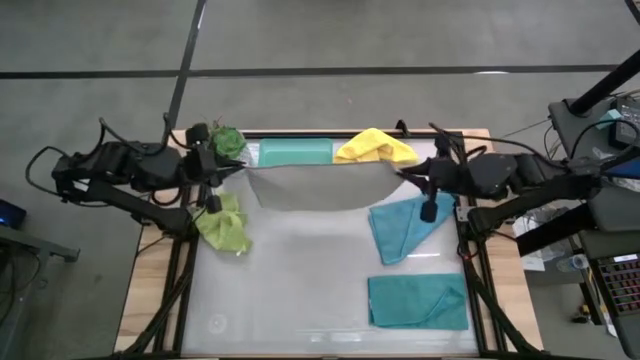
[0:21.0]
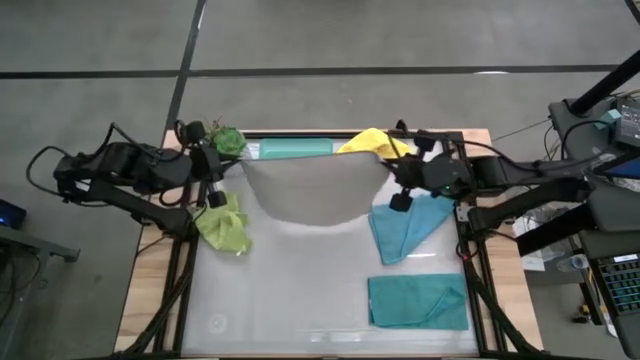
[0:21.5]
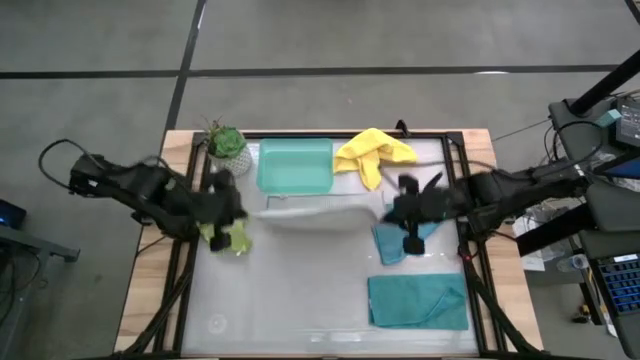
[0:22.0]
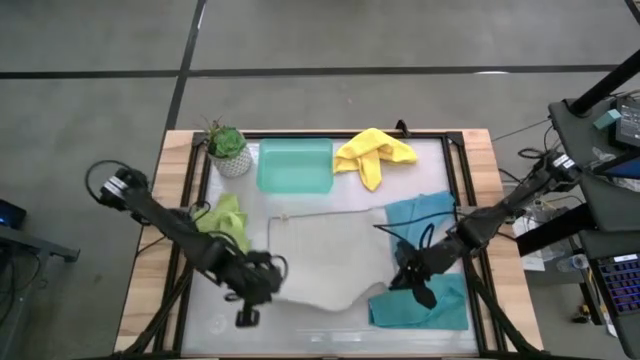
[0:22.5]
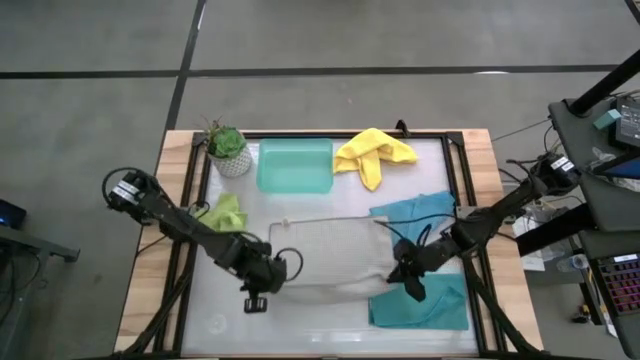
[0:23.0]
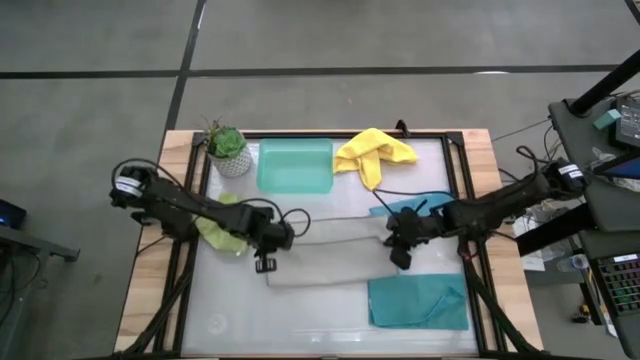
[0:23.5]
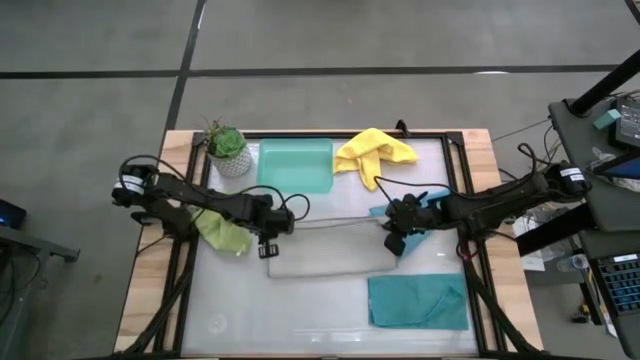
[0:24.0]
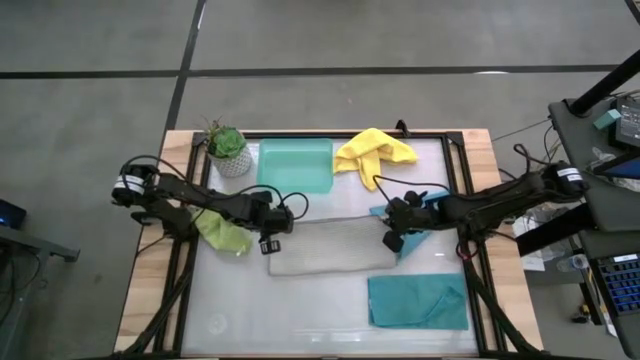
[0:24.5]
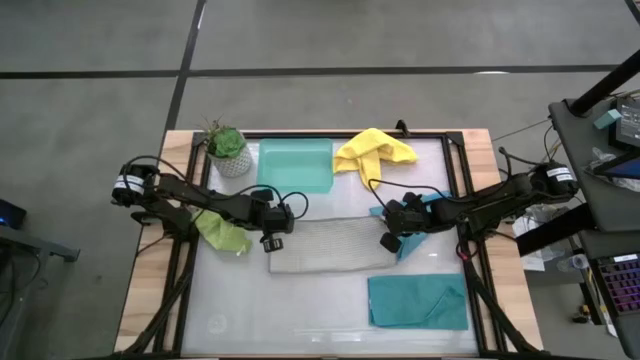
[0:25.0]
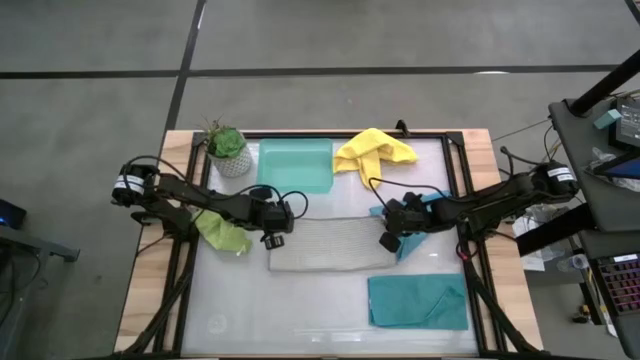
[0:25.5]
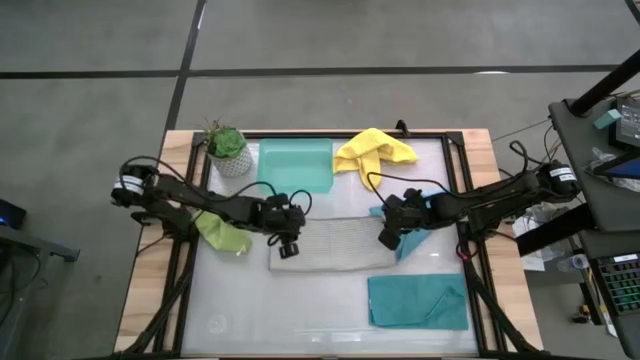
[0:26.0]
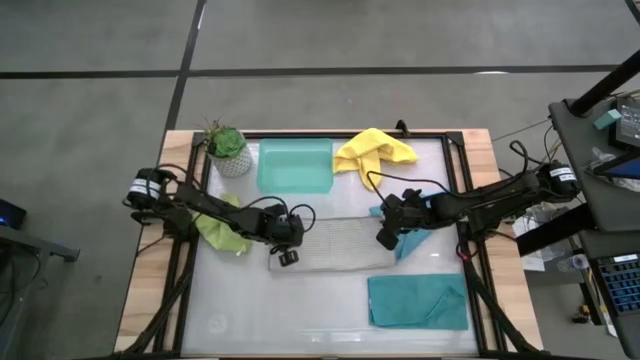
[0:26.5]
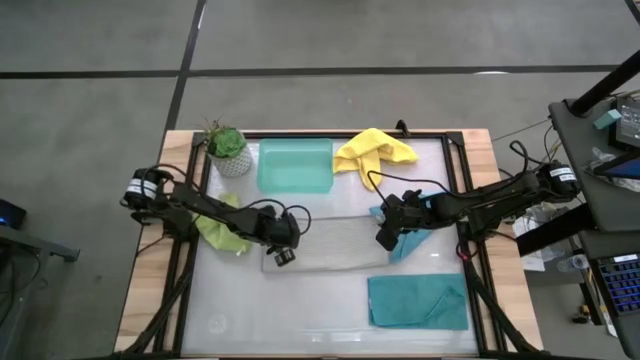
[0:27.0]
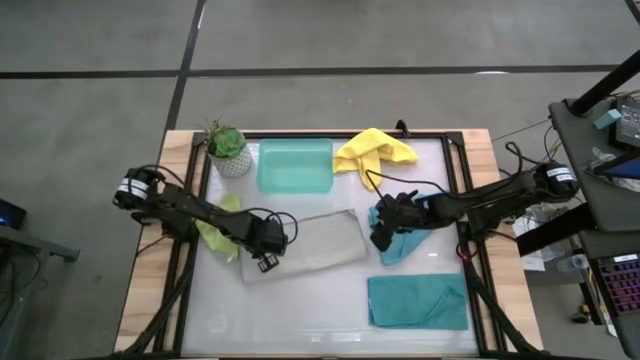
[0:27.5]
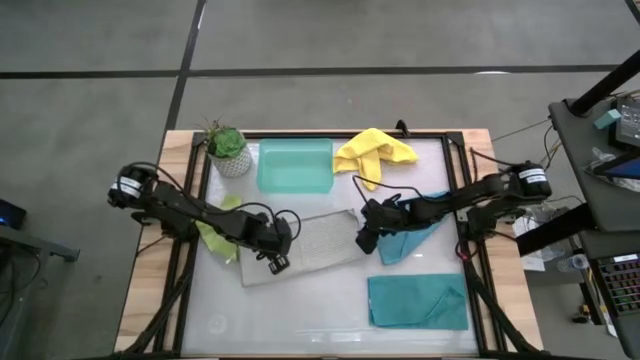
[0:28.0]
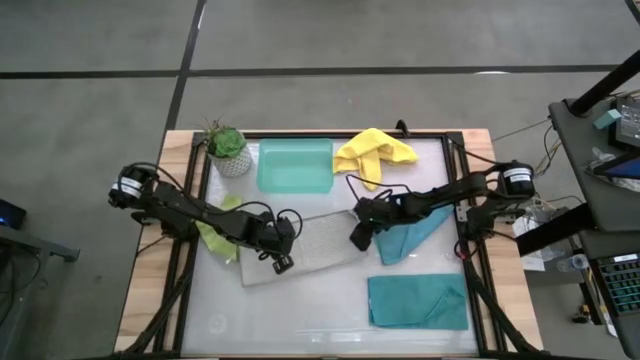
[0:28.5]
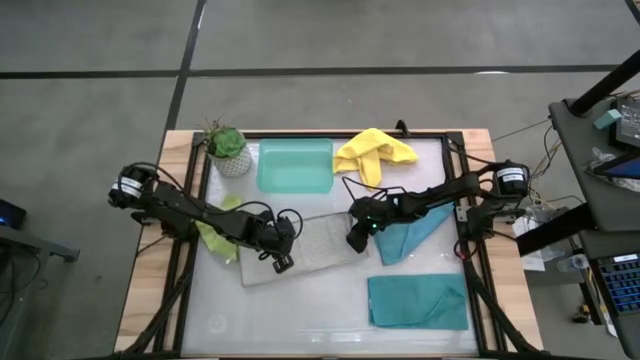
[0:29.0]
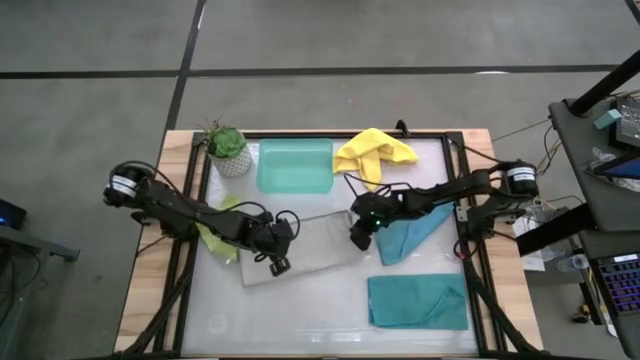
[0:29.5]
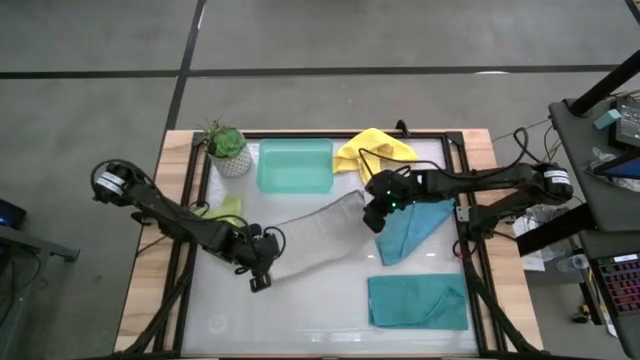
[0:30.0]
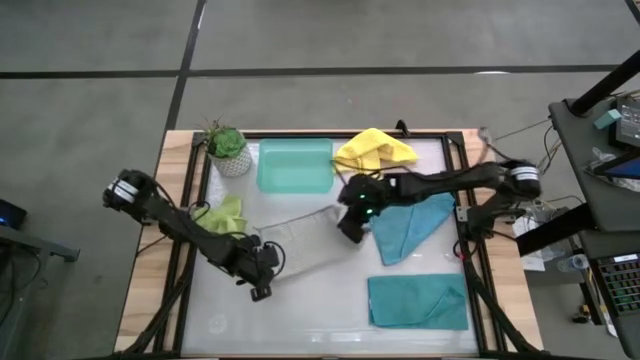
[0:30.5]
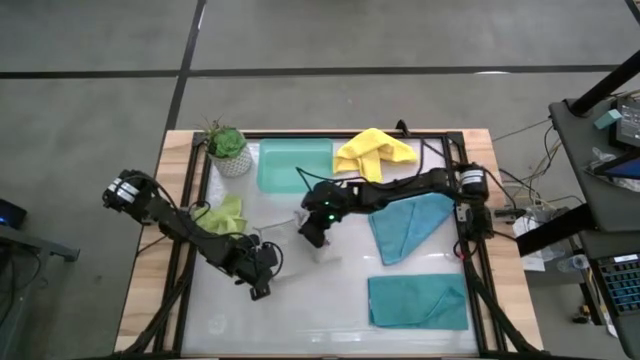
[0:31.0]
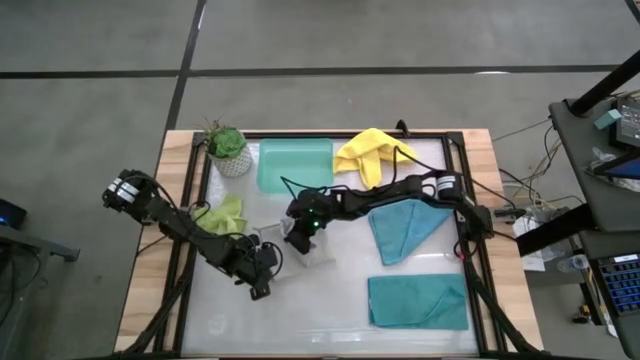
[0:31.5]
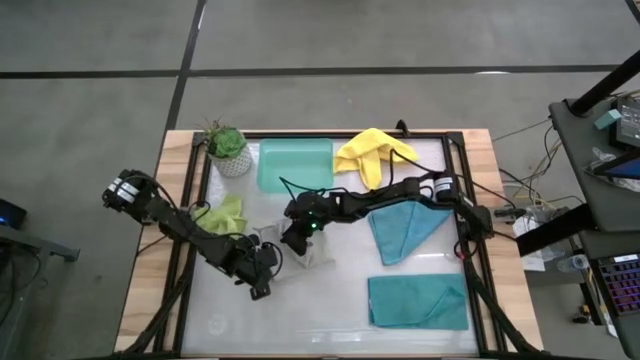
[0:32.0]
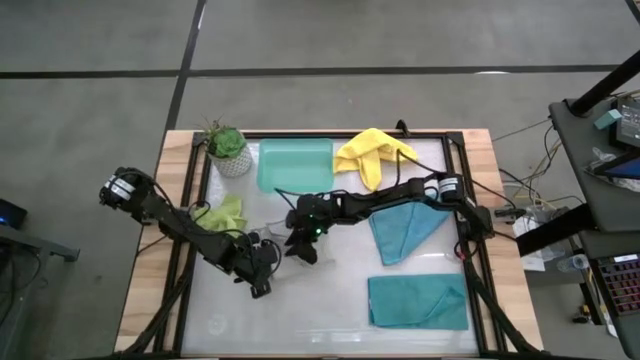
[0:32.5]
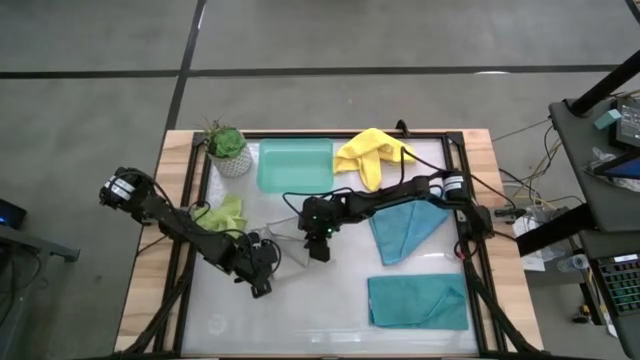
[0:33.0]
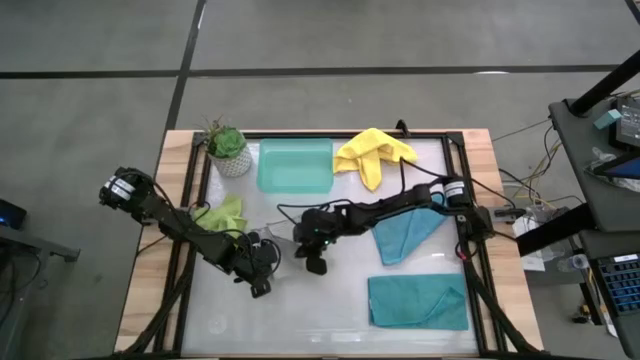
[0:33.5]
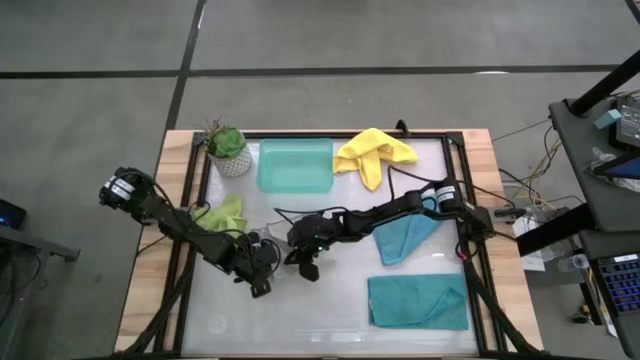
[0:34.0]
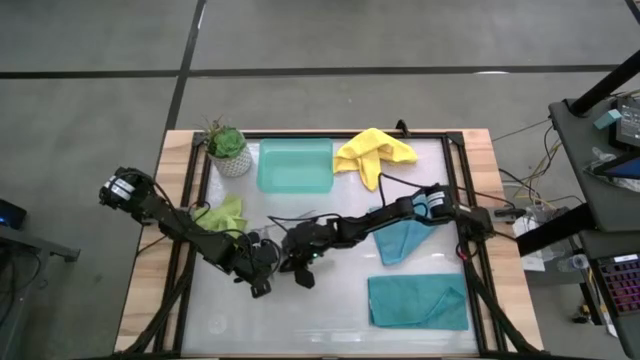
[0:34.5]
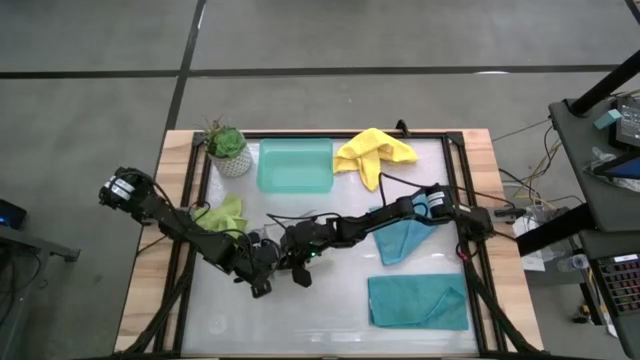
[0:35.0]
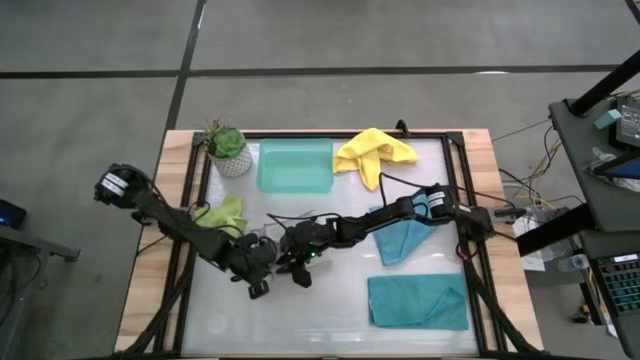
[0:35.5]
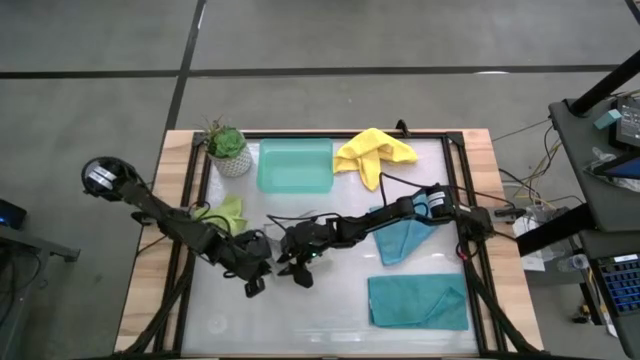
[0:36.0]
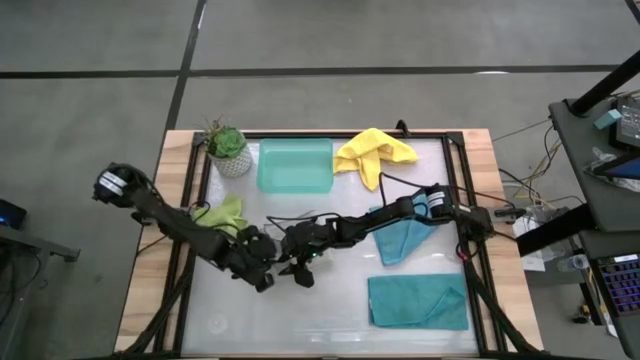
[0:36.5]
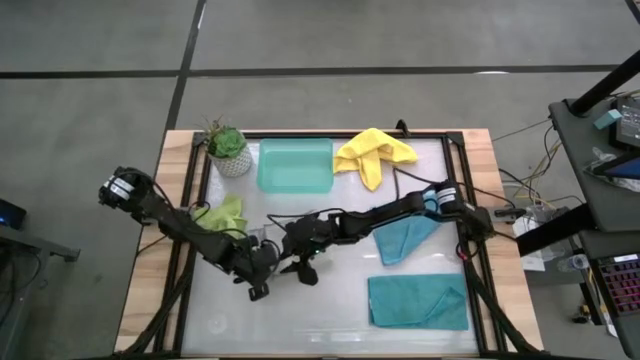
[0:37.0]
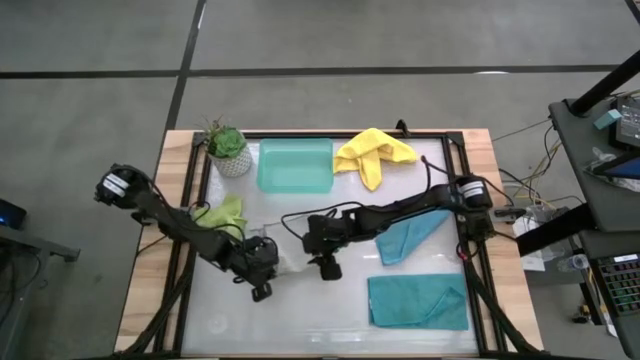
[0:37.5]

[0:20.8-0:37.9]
Task: Fold microfiber towels
Fold the gray microfiber towel
